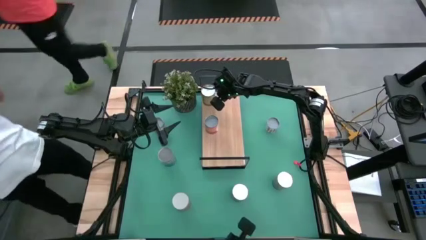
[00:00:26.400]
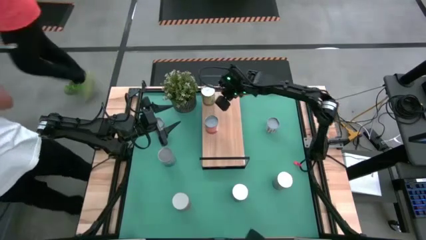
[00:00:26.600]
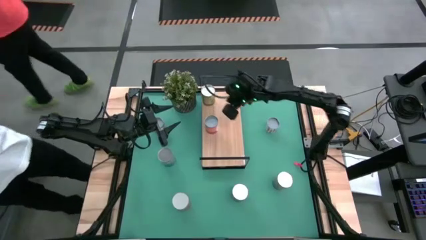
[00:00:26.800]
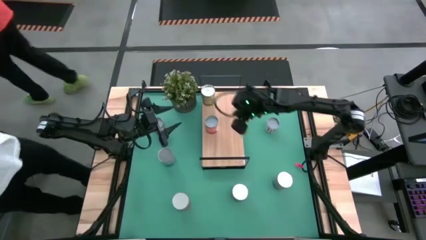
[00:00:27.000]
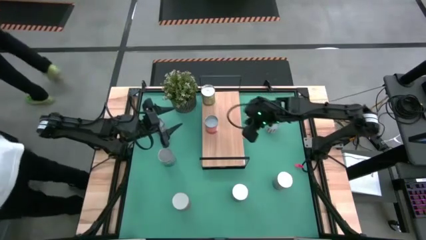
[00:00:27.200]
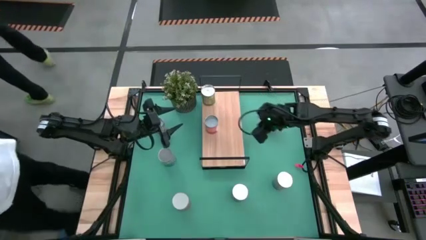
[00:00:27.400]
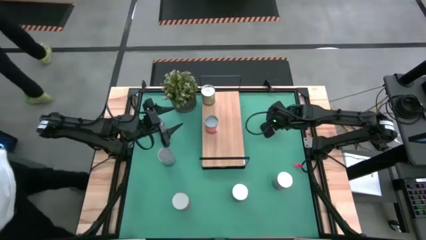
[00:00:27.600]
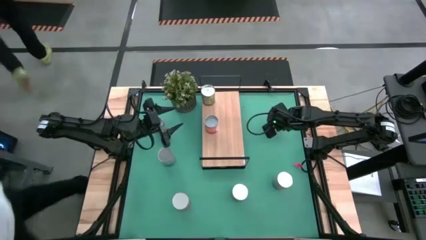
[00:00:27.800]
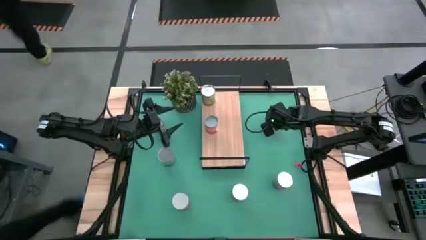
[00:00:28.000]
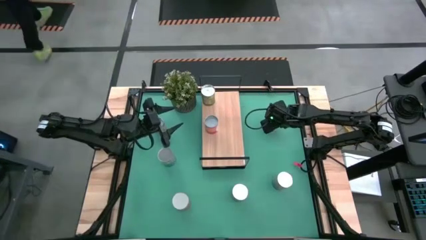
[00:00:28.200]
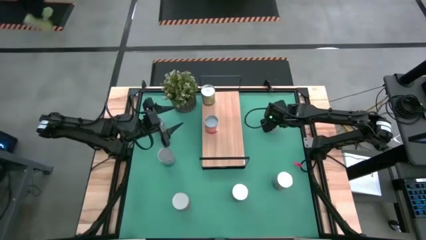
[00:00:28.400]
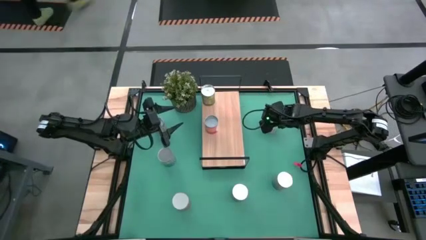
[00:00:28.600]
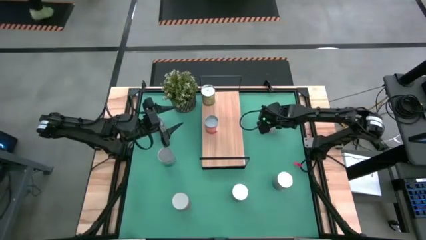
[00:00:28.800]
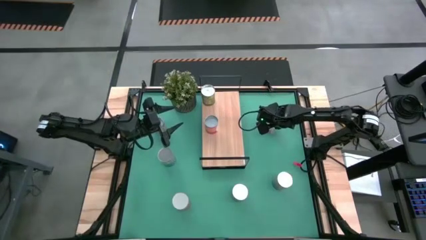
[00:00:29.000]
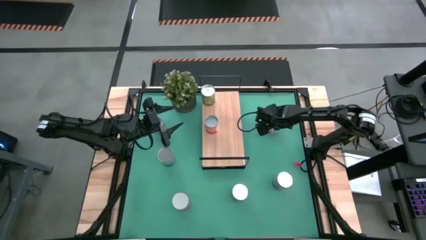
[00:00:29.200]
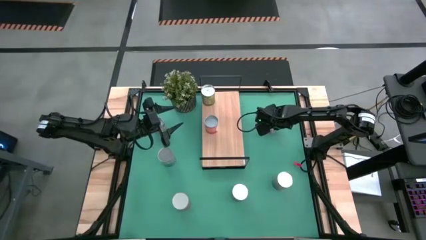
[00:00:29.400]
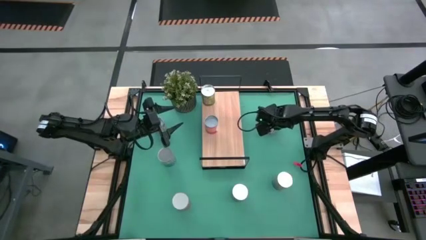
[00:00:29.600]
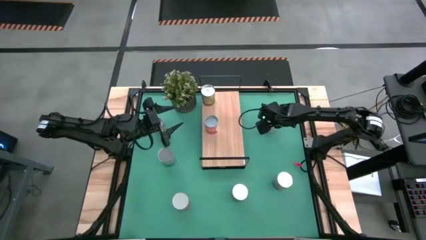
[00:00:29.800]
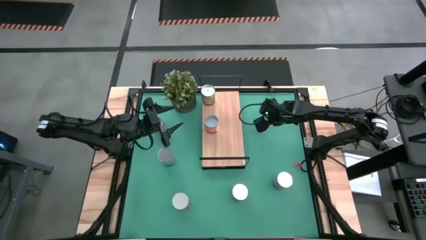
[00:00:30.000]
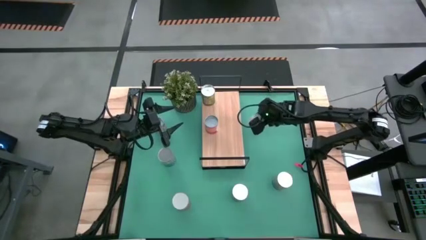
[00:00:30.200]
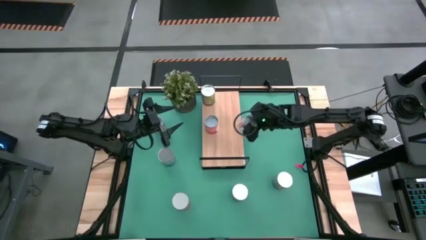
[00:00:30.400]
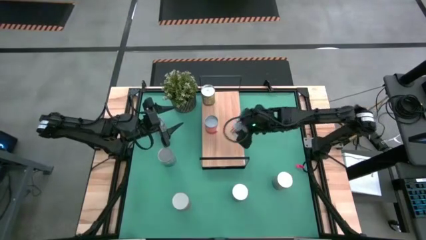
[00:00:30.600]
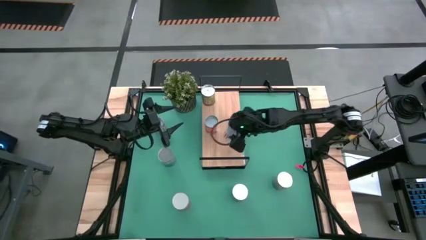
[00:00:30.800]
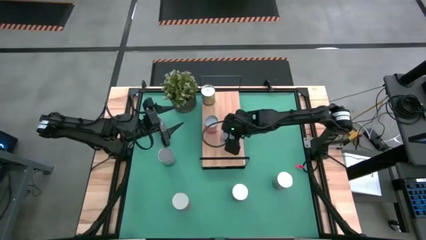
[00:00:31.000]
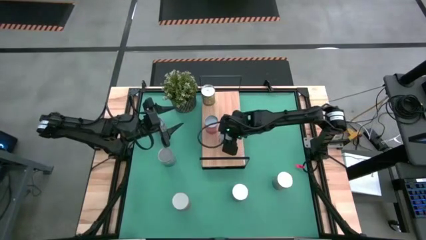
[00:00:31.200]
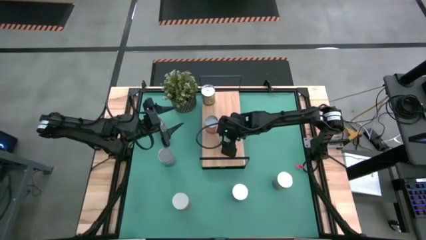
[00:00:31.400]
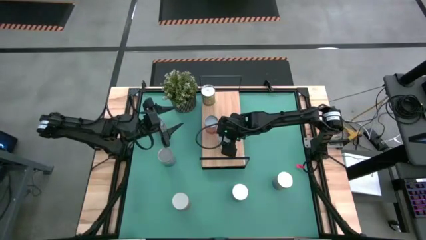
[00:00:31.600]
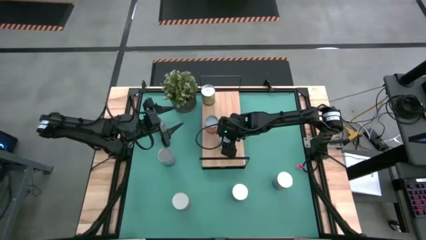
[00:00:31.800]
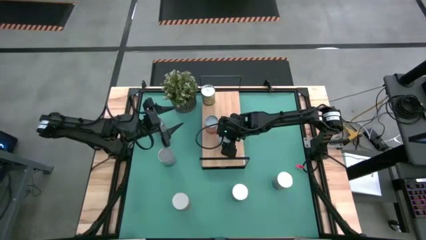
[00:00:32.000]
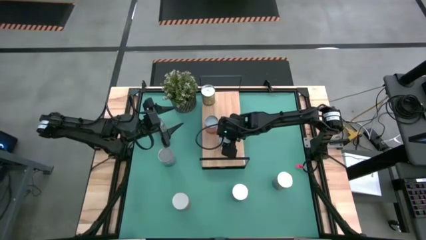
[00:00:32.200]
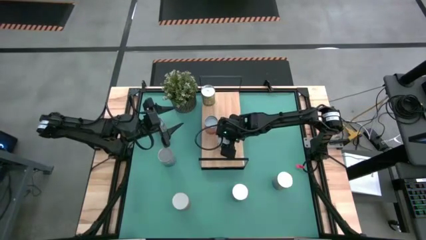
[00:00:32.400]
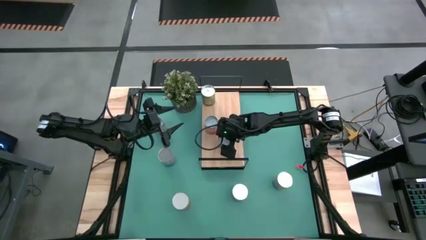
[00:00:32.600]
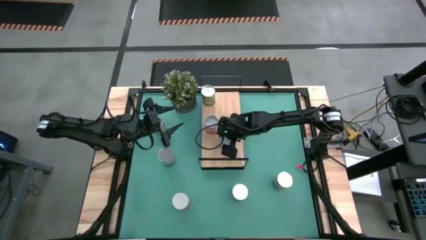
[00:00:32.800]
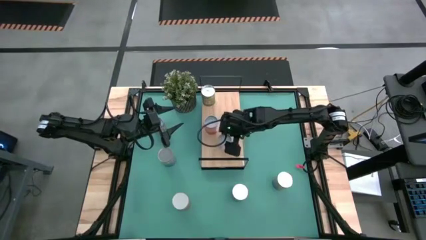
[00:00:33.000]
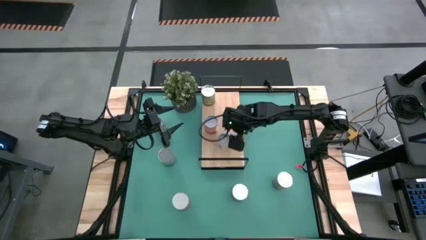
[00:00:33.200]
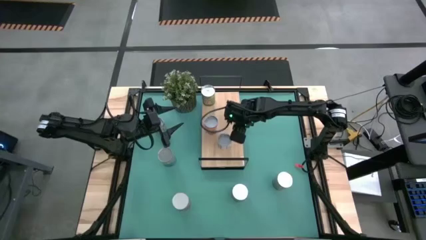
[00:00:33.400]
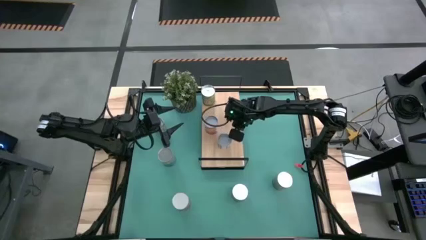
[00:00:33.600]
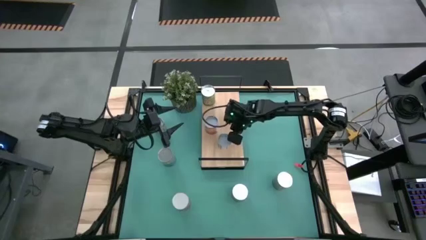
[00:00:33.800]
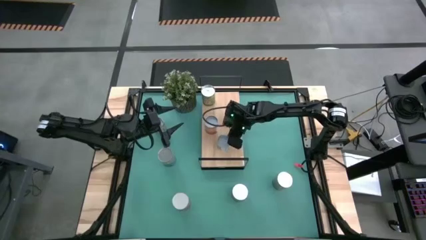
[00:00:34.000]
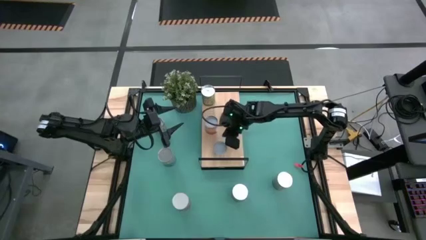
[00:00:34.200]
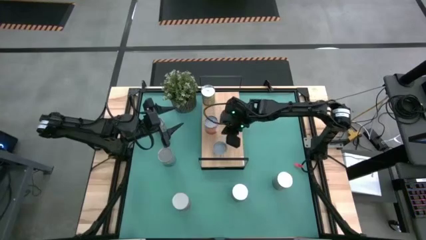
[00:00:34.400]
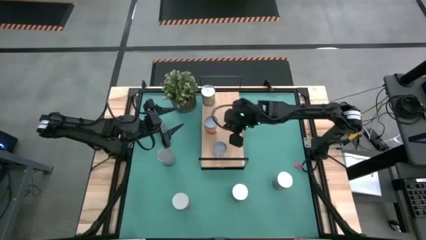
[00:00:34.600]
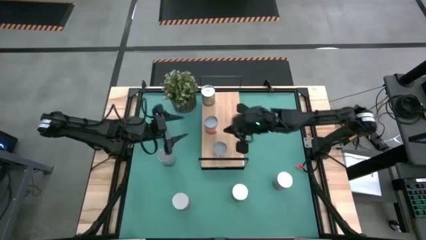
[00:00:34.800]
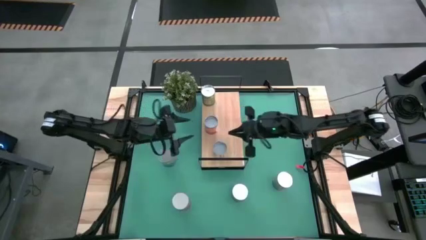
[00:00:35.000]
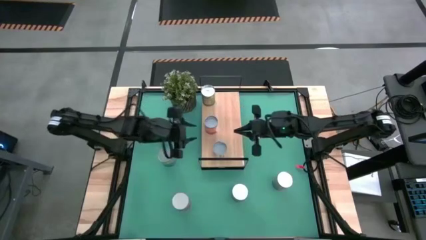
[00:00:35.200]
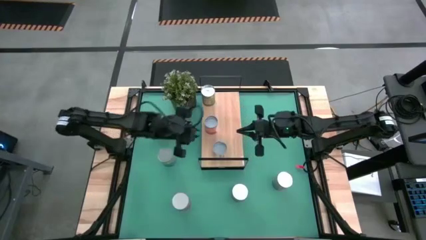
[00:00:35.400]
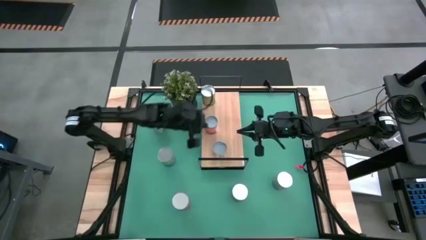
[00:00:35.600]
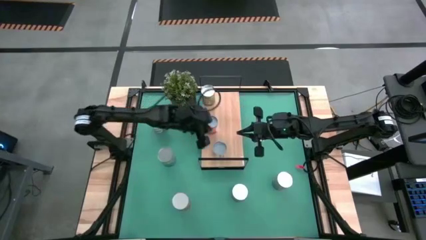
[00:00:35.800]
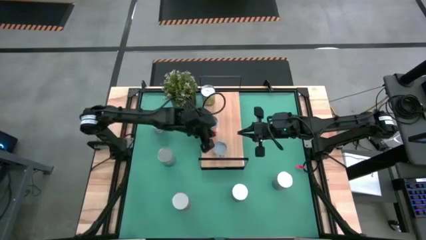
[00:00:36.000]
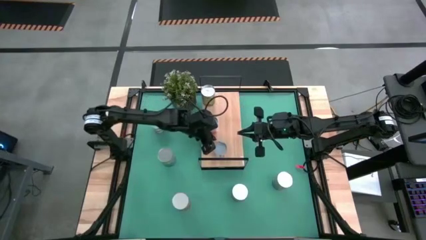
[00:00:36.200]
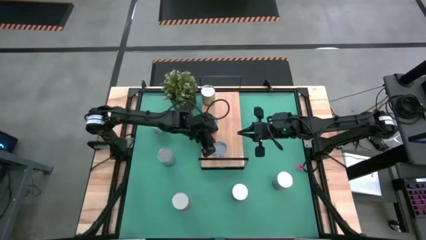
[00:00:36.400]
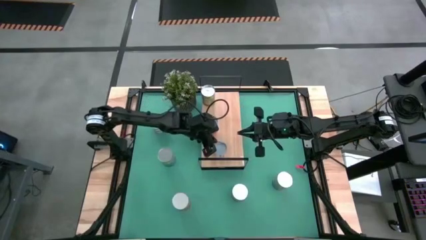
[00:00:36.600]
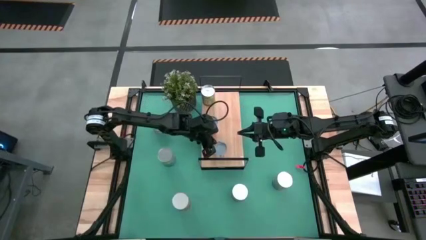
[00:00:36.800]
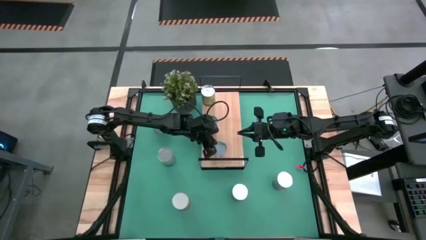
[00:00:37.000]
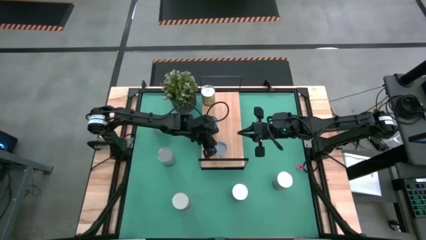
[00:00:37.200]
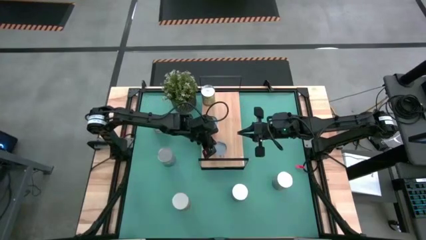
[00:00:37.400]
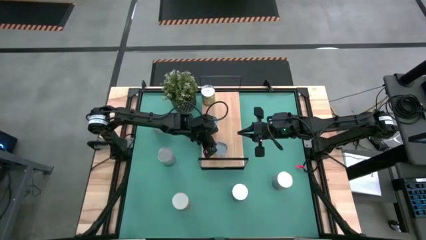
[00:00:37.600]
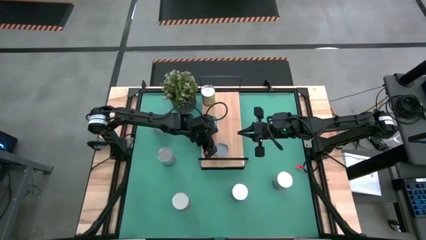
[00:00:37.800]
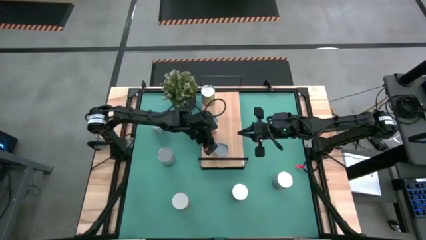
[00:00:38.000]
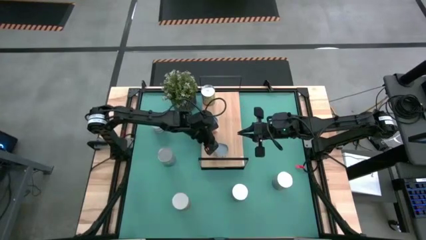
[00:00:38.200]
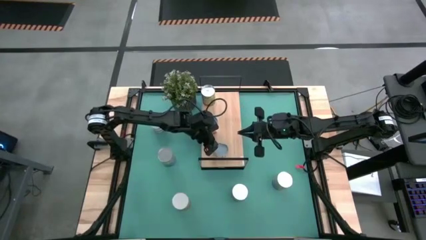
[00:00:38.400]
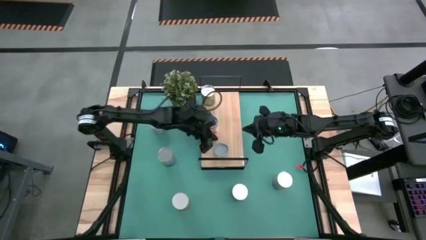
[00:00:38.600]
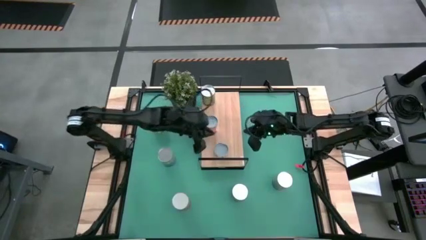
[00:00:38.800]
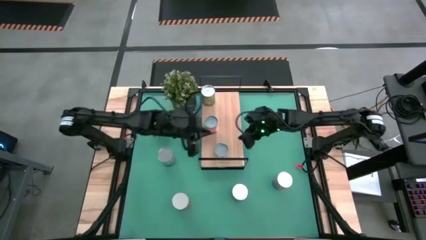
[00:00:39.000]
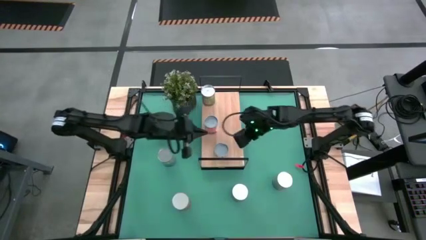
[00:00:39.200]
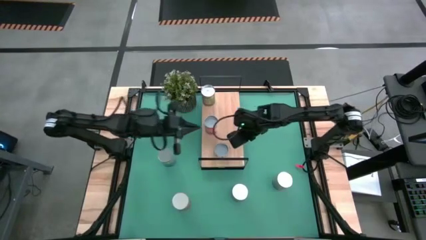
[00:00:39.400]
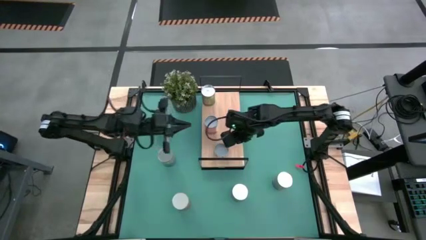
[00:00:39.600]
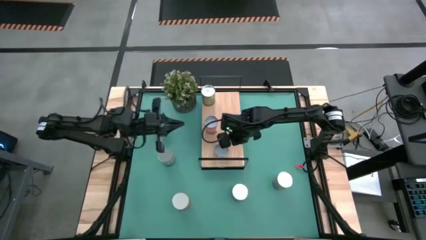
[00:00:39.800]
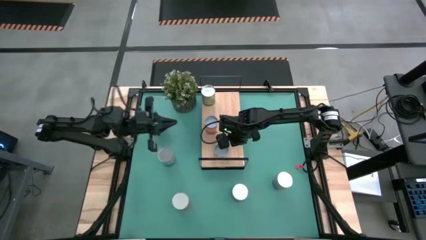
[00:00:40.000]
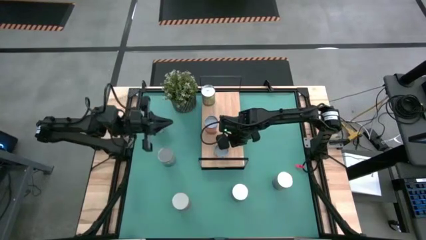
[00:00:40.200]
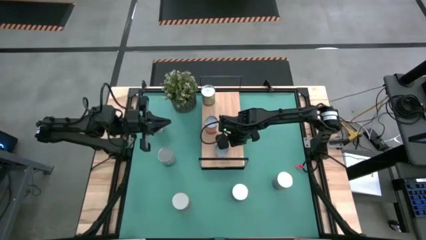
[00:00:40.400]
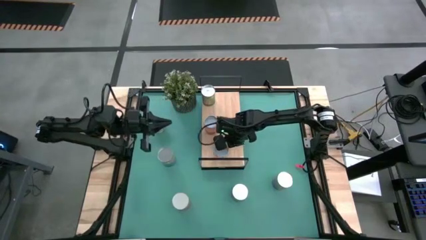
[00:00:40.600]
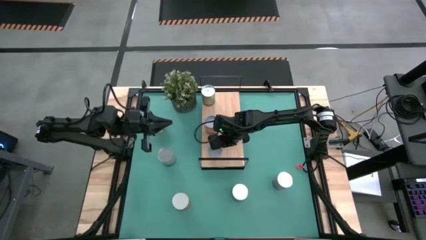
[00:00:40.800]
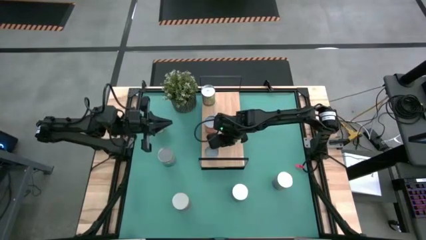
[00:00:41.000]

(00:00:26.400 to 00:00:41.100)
Task: Pick and place cans onto a shelf
Put the canned carrots on the shelf

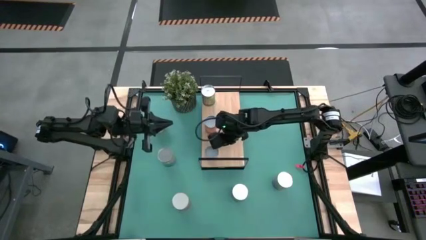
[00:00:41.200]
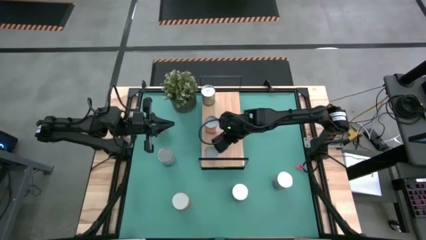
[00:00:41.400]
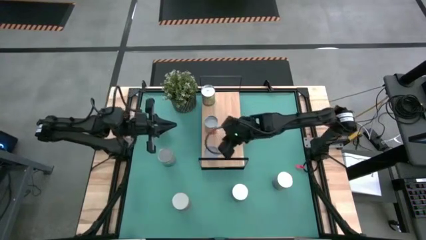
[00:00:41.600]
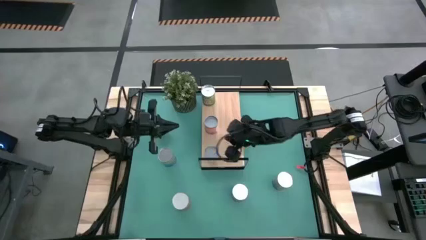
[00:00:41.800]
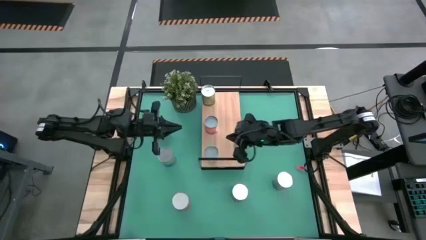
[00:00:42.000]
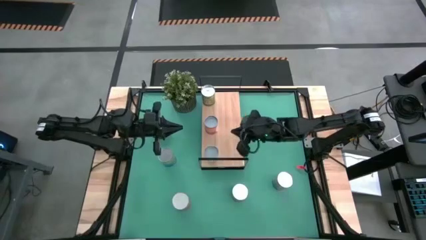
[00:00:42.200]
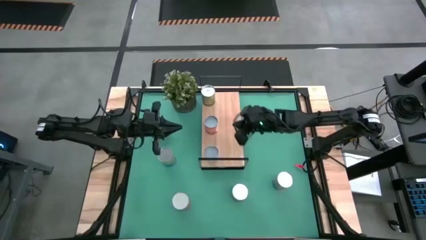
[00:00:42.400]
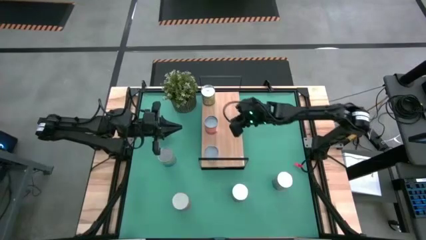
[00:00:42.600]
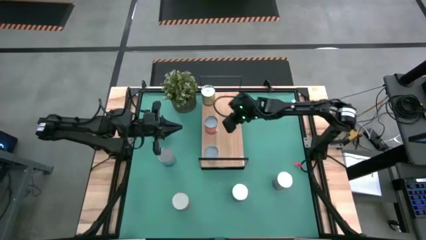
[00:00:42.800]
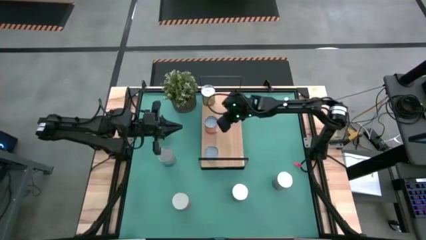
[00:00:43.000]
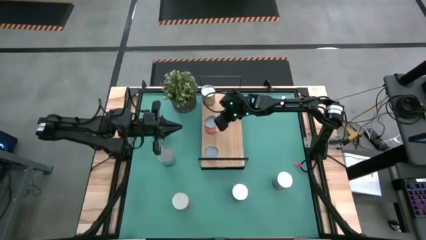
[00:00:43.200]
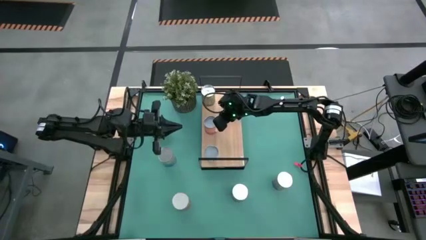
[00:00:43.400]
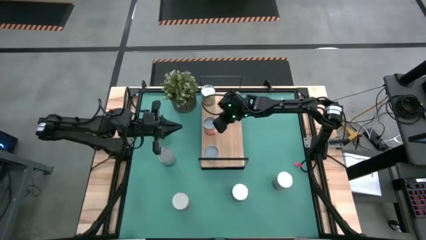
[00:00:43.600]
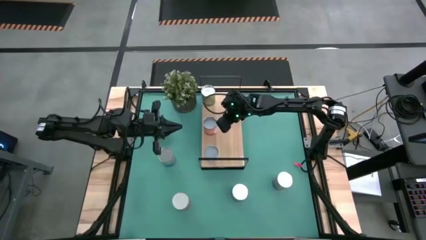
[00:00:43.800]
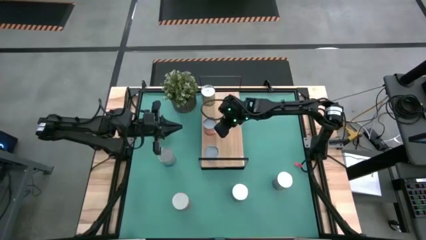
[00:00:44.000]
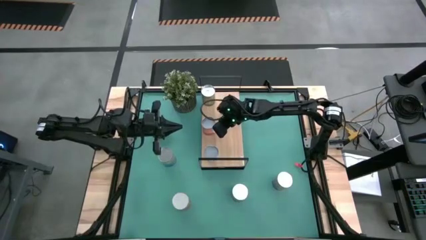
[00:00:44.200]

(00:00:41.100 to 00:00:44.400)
Adjust the canned fruits on the shelf
